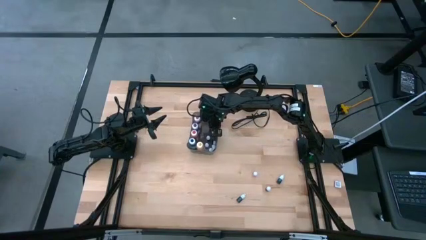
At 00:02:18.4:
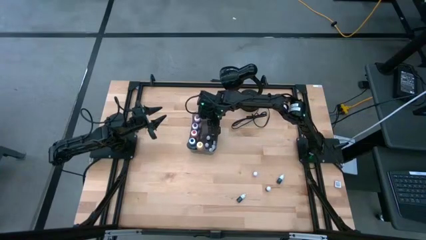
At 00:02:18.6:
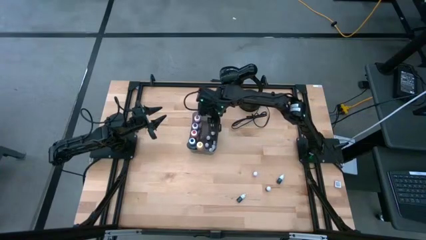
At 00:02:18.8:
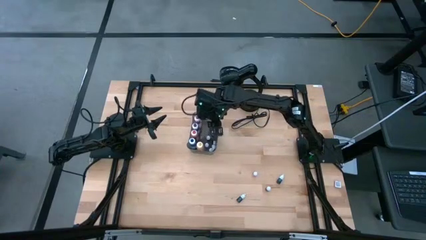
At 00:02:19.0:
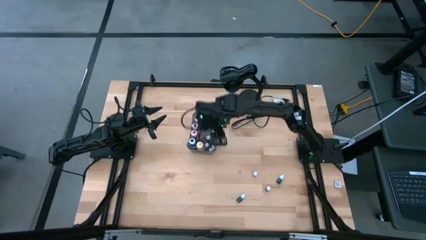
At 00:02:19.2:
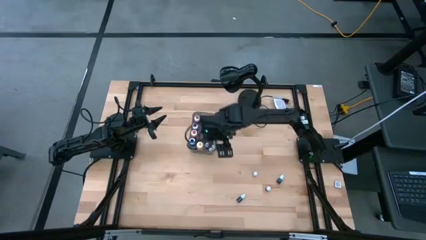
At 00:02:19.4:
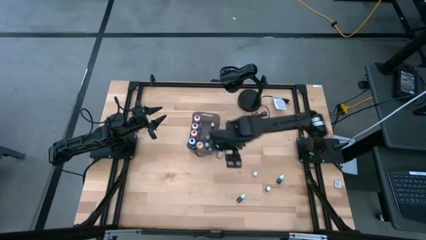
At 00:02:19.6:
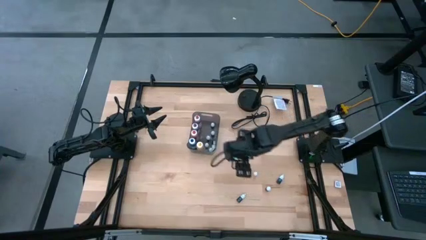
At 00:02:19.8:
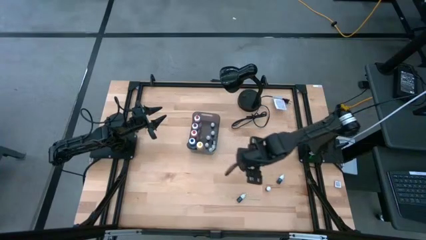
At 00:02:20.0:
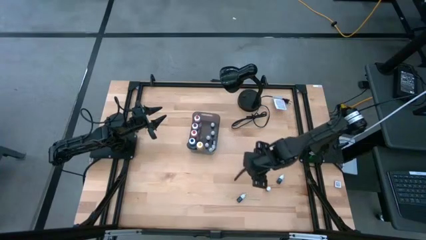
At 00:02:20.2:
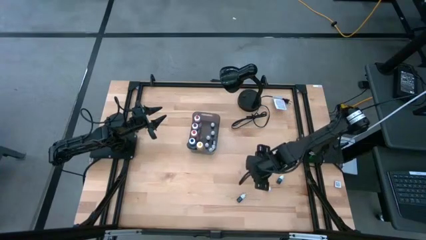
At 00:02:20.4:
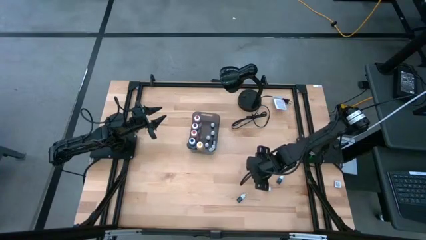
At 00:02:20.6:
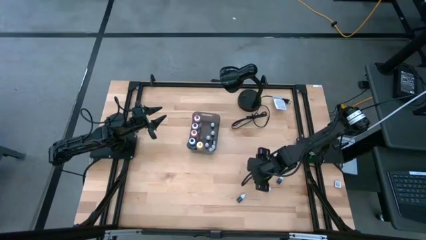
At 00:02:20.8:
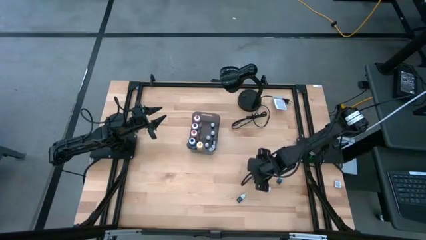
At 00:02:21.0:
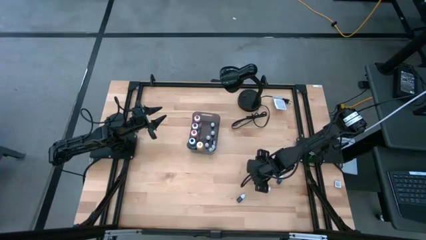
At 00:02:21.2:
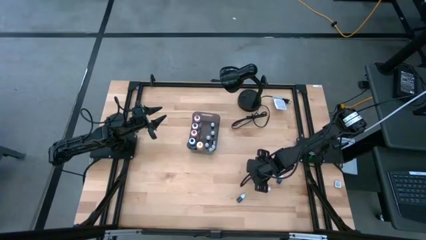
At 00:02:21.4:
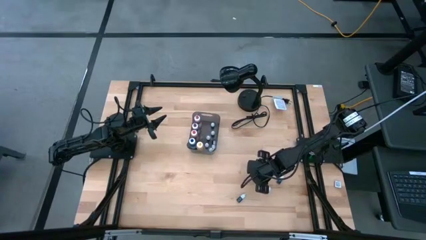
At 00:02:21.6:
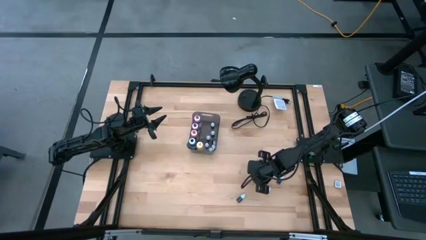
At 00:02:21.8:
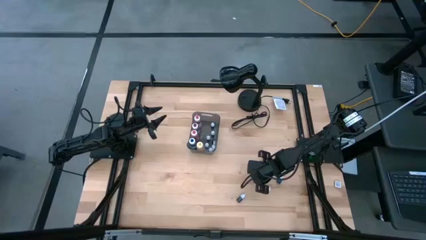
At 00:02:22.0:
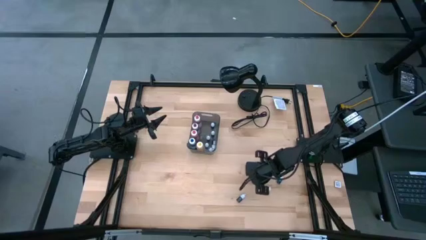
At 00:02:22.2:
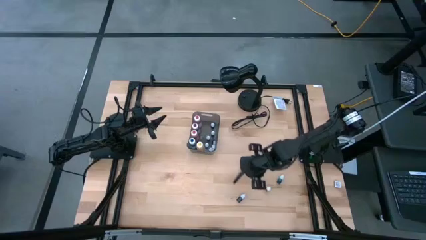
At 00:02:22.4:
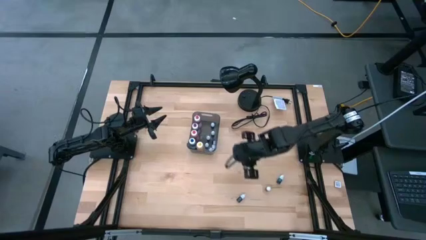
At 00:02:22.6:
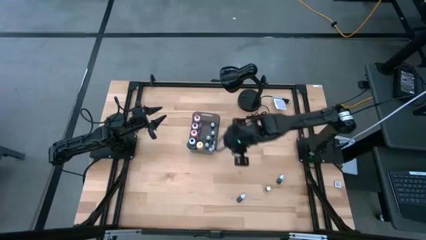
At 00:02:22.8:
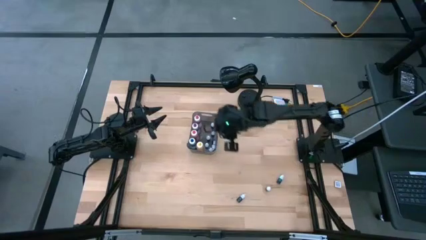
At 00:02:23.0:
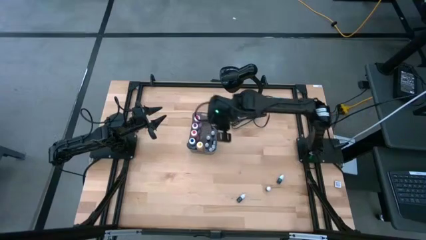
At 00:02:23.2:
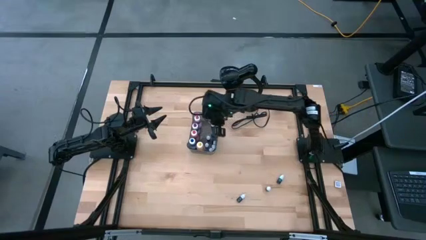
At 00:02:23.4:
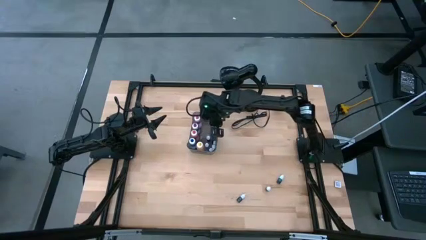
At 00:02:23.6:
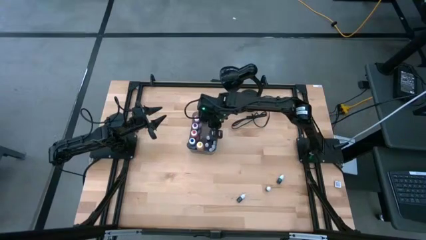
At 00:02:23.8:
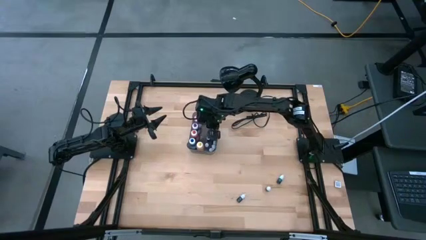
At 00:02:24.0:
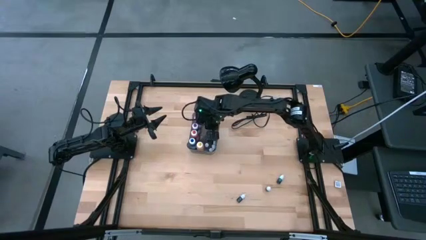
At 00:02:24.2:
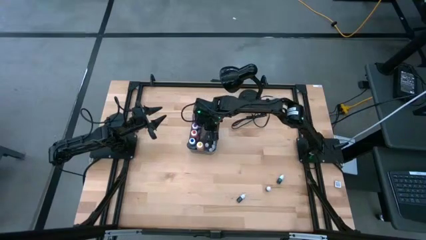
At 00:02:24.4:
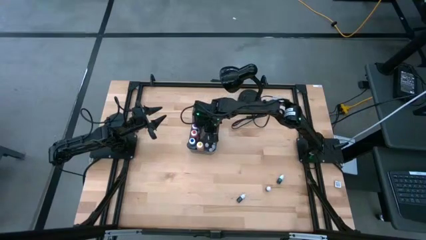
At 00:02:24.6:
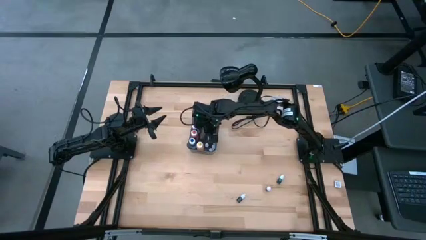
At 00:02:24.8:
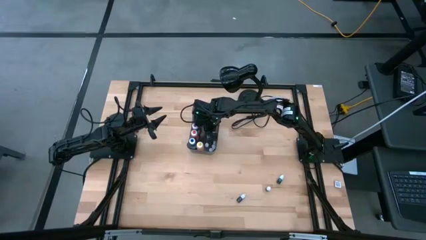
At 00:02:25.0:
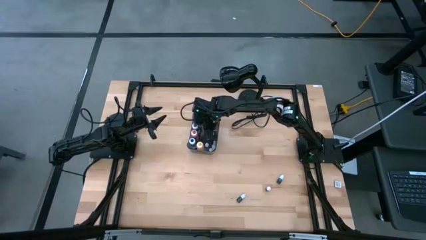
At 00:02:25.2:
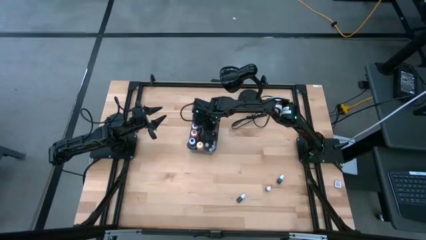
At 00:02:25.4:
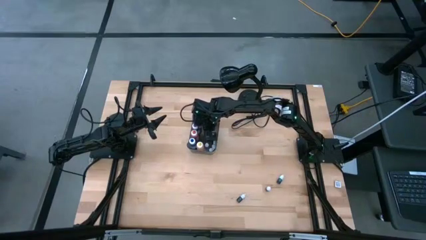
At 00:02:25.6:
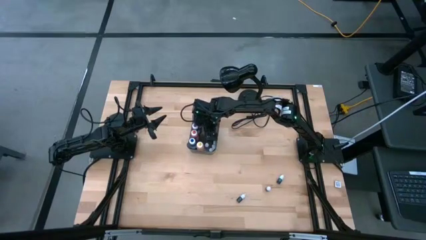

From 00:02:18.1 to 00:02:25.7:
Task: Pick & Place food coloring
Put the small red food coloring bottle into the gray transparent bin

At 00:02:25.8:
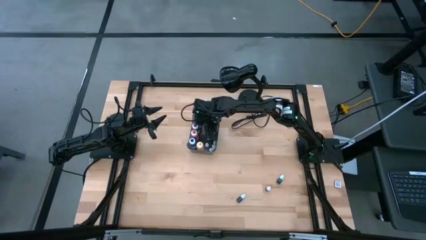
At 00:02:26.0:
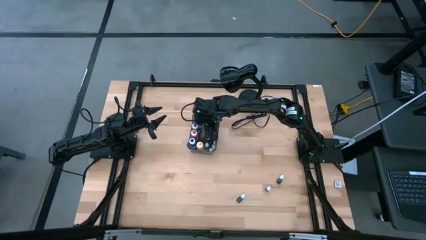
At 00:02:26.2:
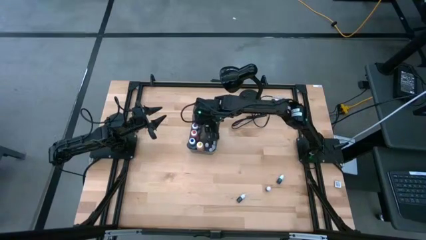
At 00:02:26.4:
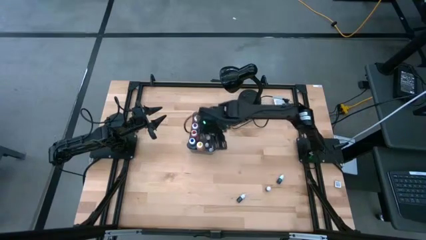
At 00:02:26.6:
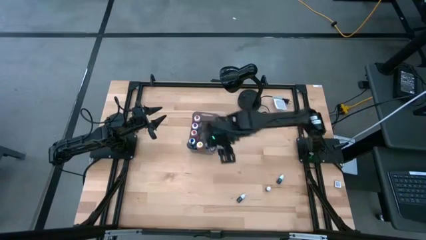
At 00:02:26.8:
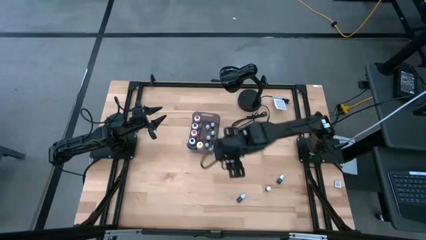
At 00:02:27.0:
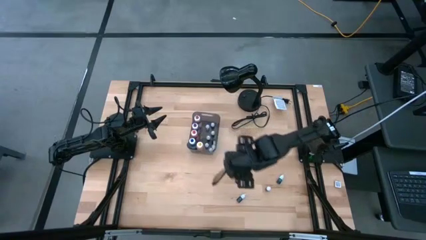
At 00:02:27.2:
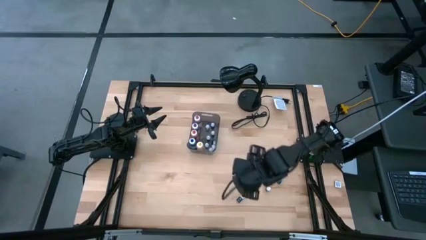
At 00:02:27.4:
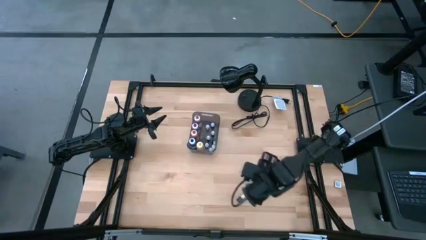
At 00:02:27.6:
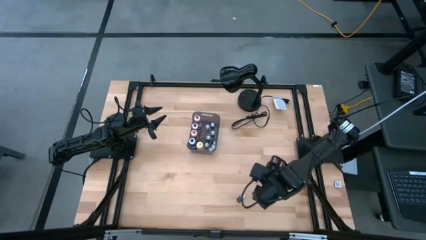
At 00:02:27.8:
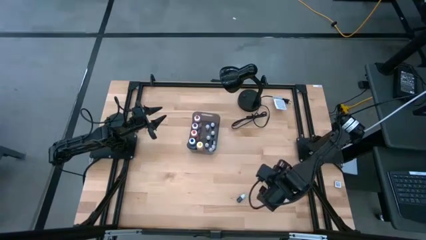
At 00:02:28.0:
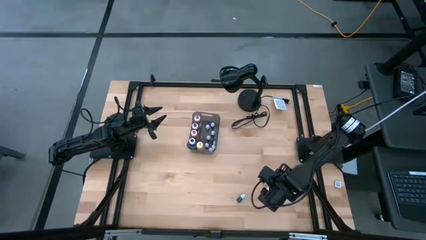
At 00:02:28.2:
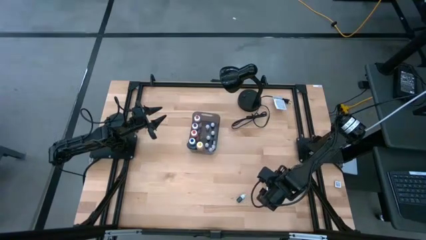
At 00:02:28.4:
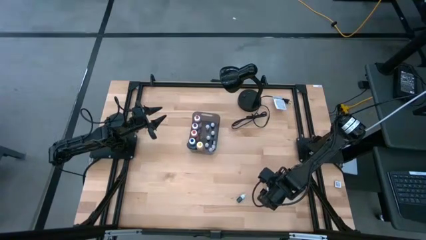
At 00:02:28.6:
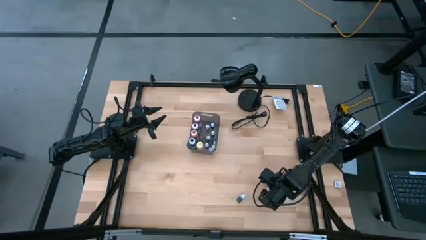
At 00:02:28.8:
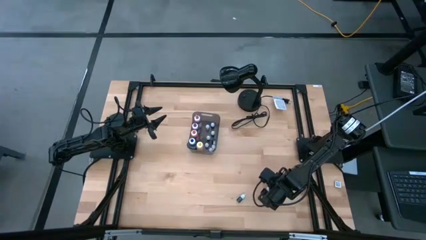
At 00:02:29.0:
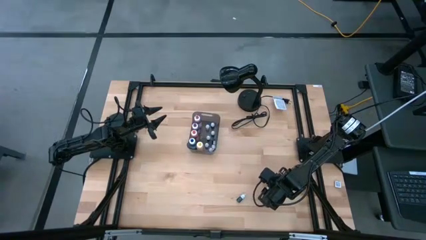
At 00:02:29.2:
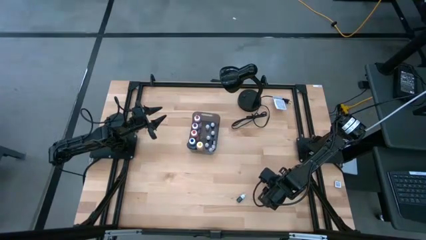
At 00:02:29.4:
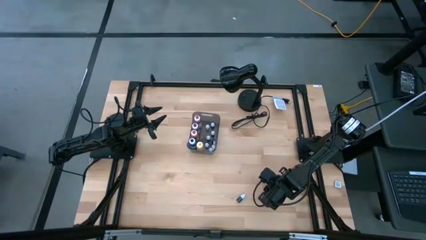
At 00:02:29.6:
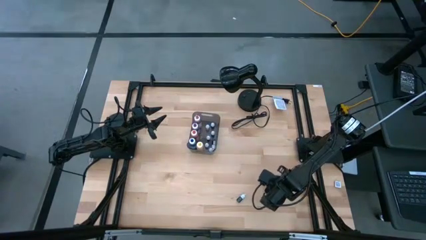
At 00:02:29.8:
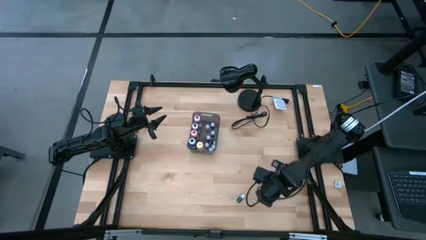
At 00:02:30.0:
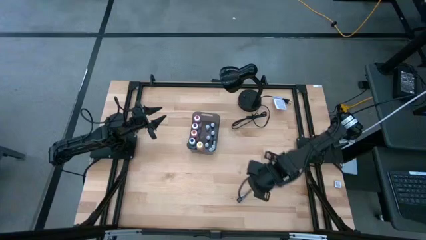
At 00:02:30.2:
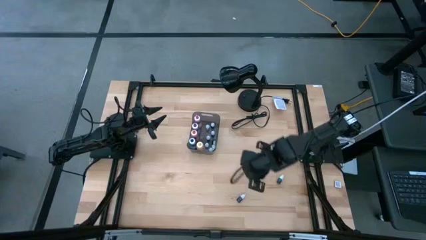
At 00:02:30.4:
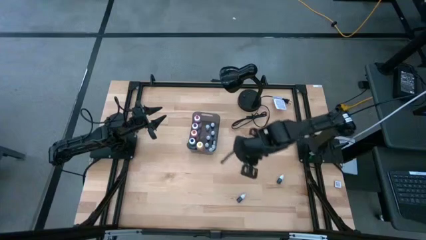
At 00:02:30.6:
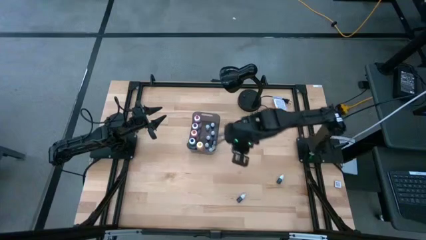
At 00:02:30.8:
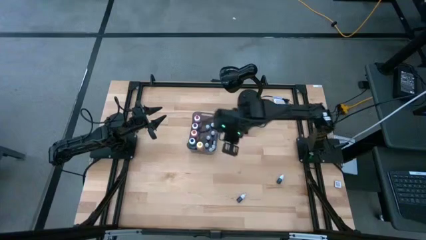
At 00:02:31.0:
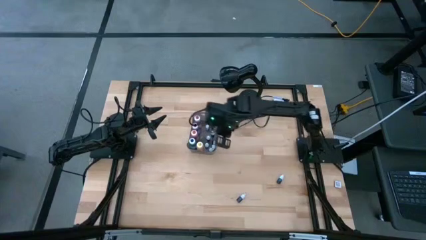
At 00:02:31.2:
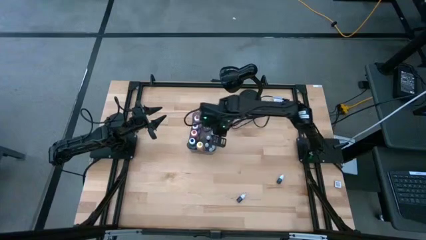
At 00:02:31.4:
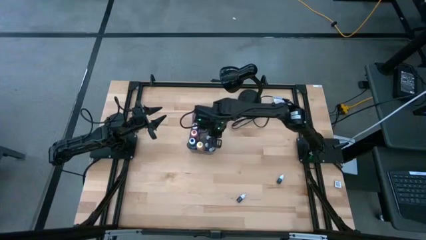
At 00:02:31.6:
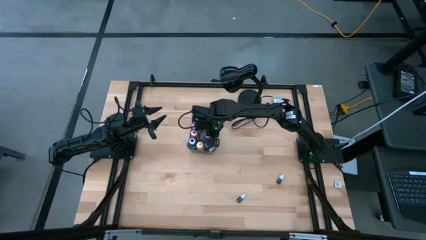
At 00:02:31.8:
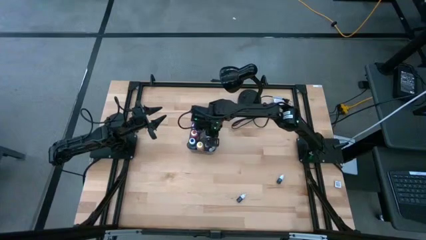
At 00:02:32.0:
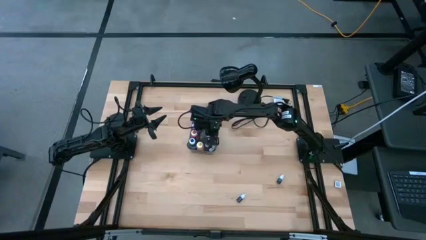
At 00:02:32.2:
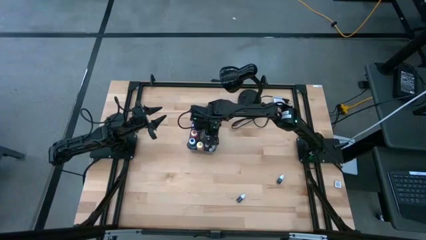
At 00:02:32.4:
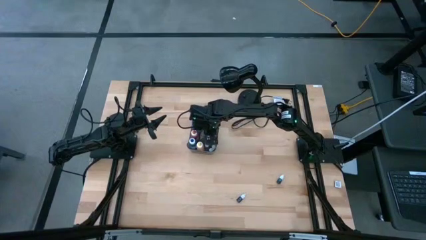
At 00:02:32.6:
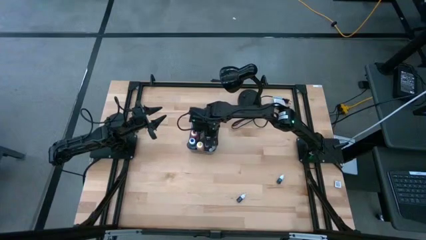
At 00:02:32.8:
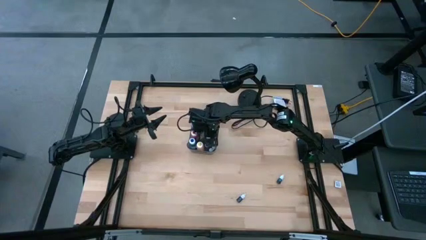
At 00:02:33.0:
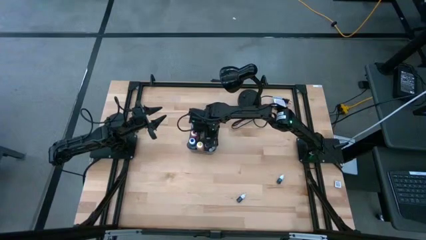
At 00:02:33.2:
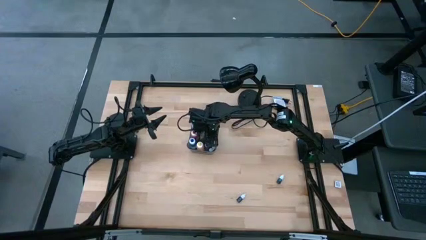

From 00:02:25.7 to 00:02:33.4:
Put the right small black food coloring bottle into the gray transparent bin
